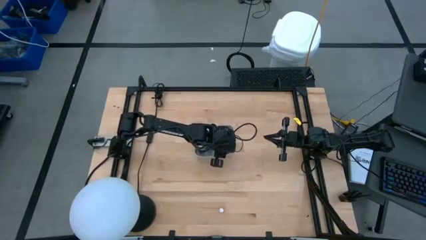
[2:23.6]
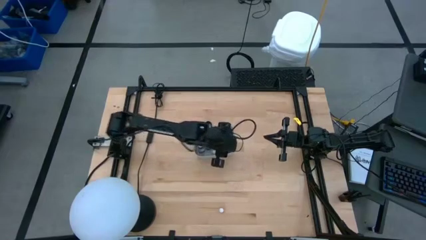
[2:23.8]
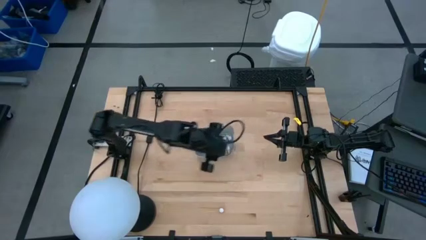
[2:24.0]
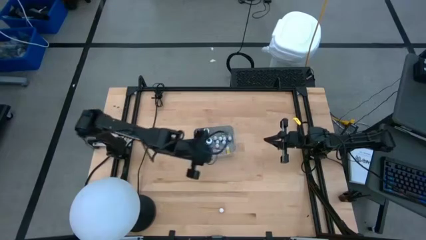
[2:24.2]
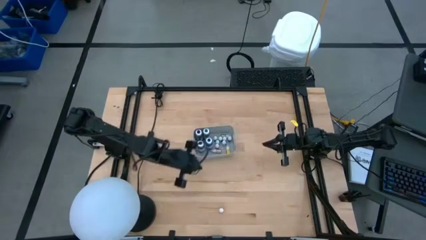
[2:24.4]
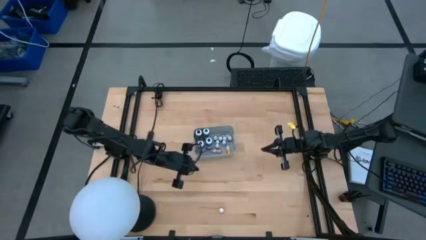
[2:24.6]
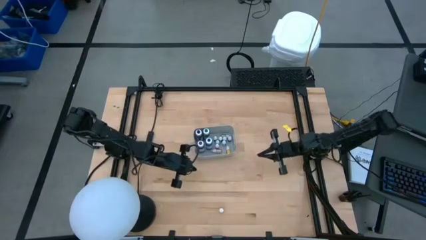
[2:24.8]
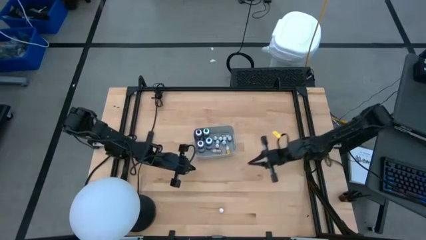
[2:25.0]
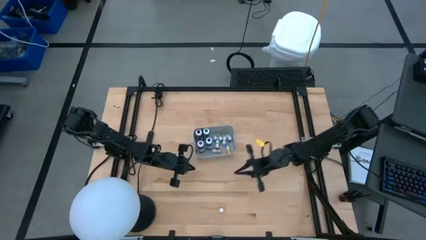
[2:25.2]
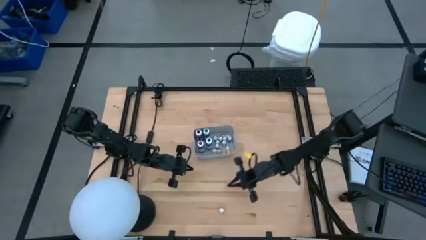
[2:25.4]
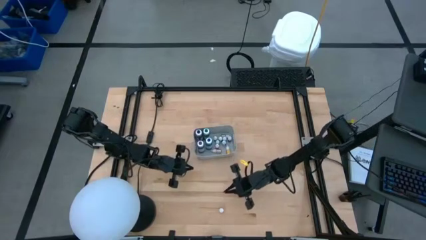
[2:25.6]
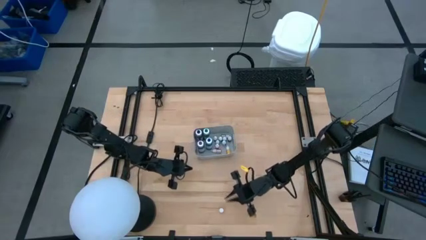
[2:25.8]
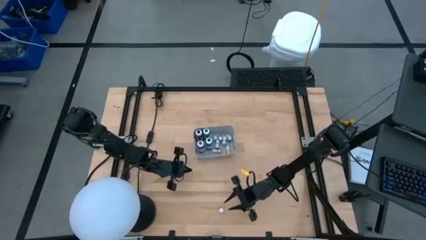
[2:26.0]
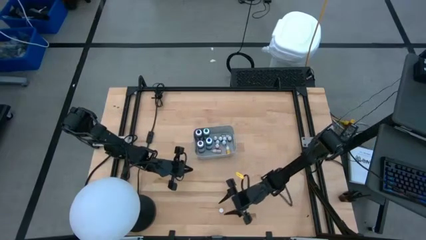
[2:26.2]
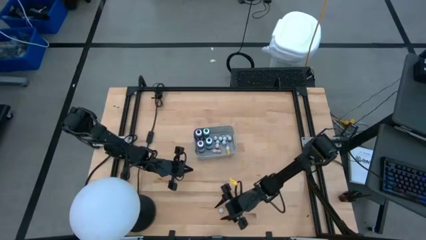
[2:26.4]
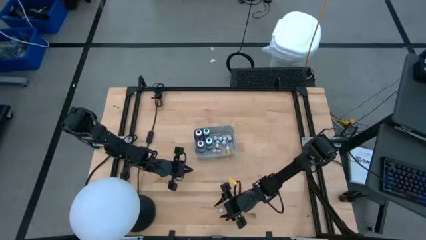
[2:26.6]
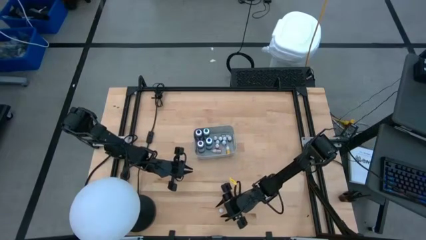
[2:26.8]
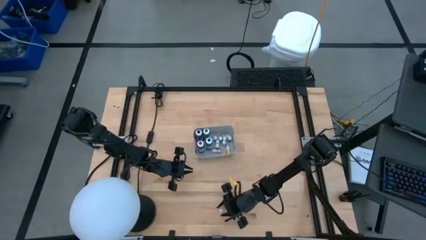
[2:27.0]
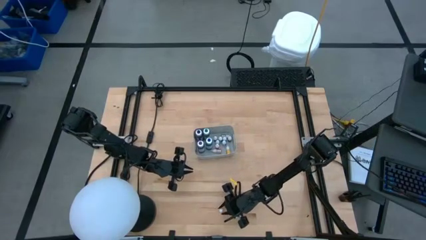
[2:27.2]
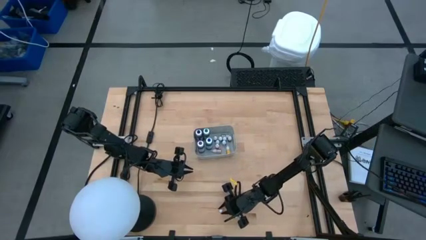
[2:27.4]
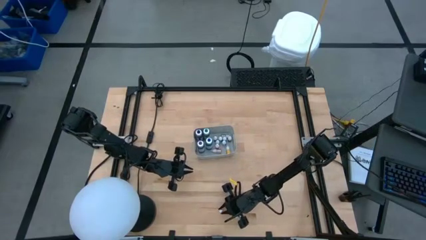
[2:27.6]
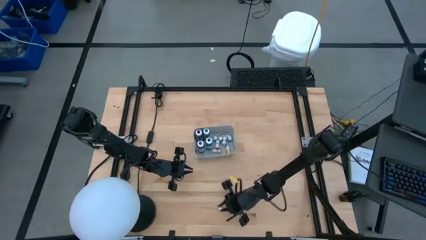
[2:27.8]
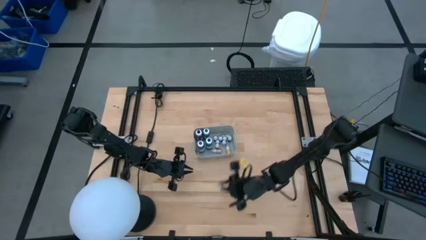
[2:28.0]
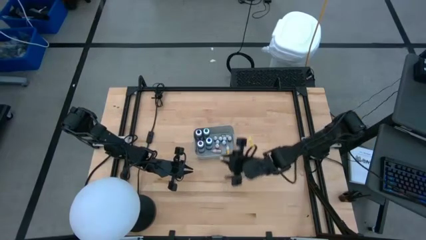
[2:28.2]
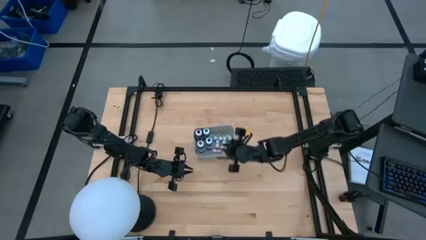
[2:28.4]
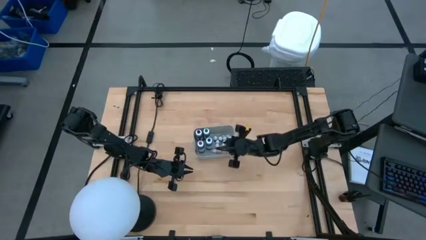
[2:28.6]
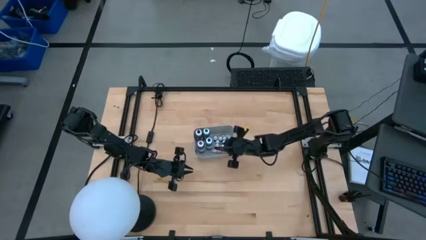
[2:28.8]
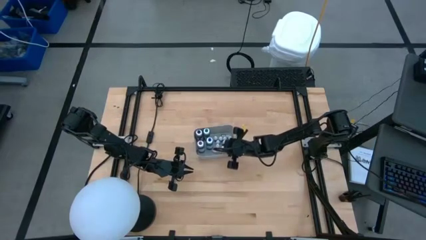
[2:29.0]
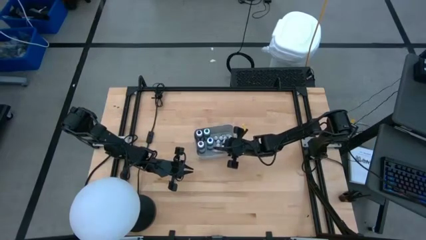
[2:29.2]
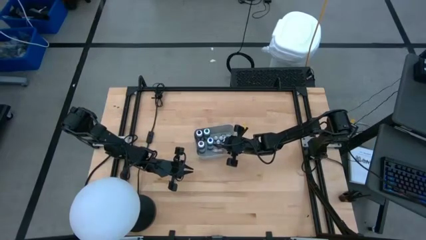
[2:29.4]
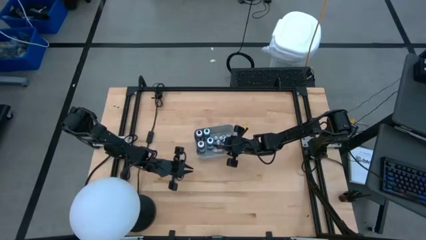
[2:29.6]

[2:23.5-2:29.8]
Task: Pick & Place food coloring
Put the small orange food coloring bottle into the gray bin

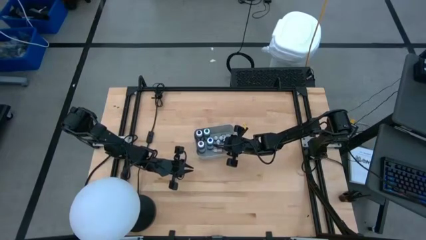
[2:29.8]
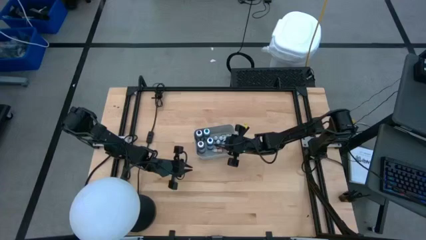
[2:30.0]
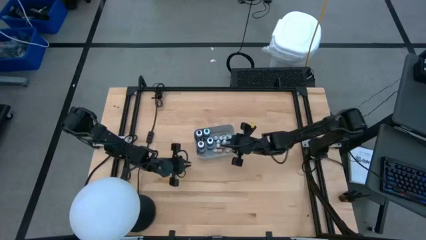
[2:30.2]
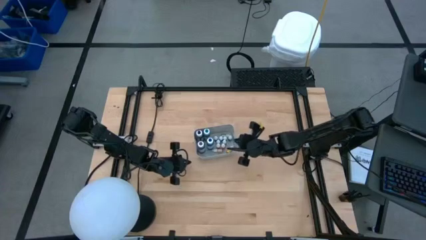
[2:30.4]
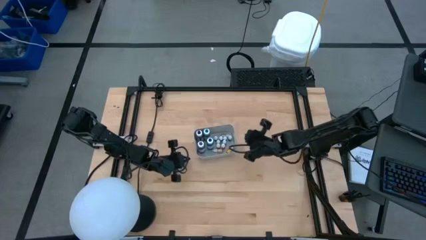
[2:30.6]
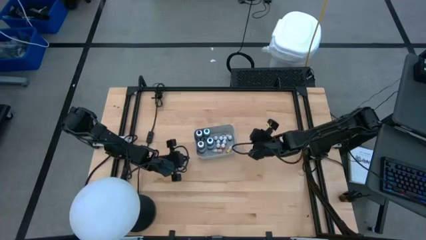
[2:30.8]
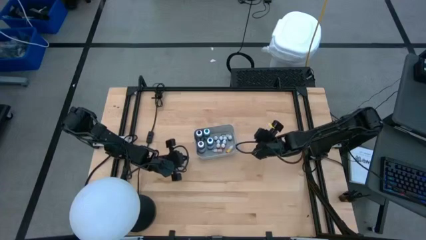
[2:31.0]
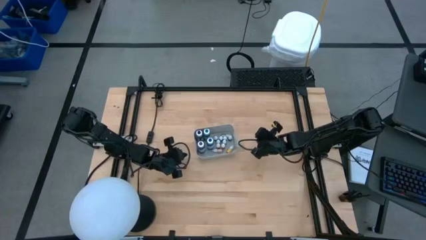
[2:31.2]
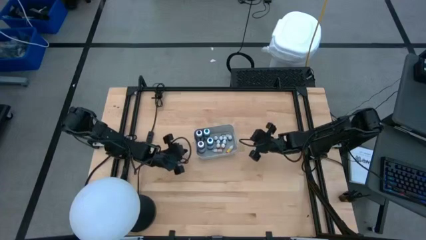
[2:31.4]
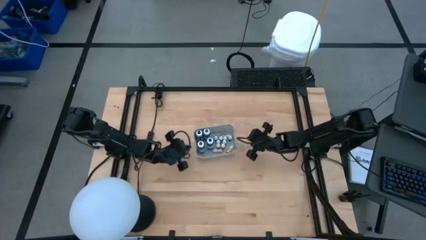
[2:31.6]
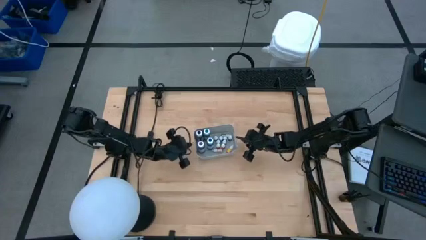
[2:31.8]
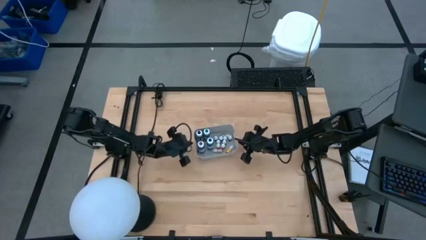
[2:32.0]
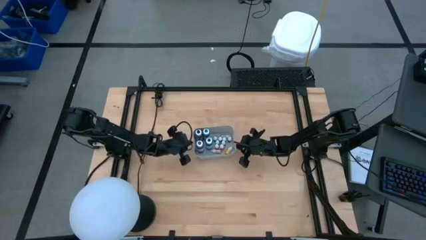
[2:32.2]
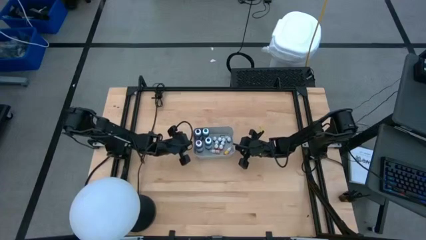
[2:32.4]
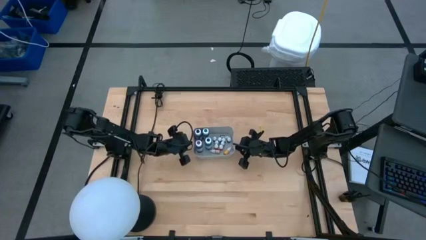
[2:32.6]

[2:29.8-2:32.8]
Adjust the gray bin

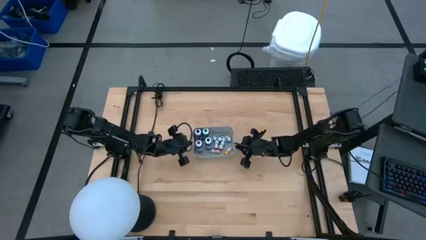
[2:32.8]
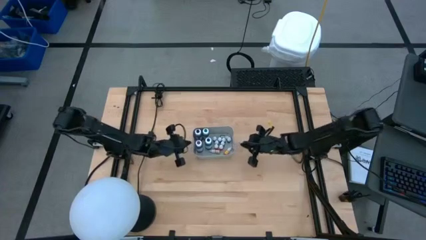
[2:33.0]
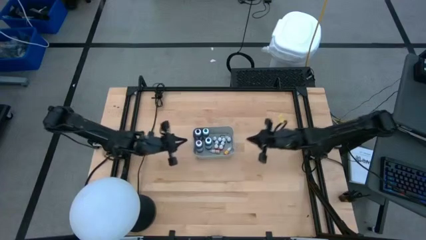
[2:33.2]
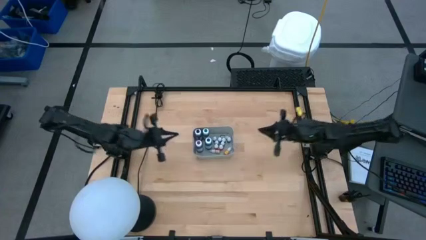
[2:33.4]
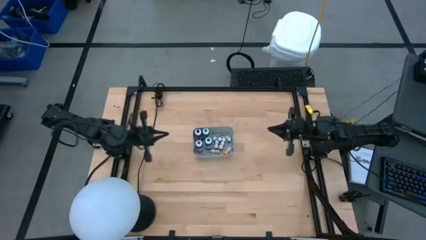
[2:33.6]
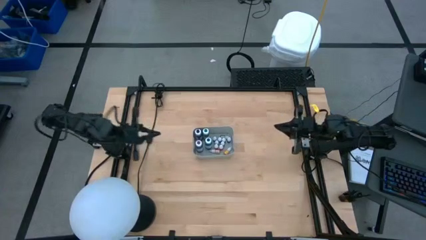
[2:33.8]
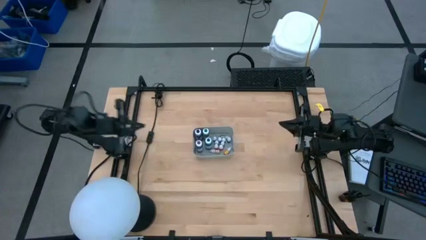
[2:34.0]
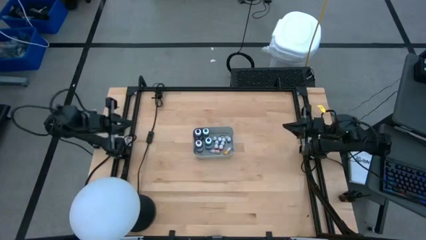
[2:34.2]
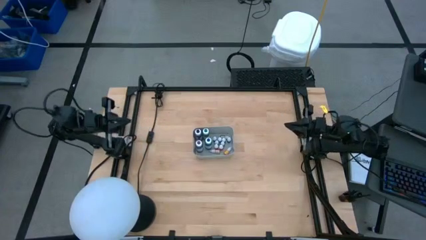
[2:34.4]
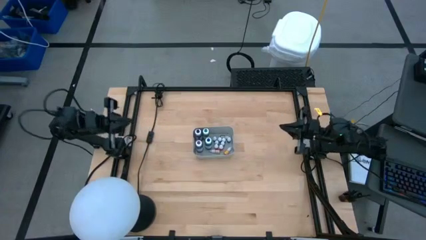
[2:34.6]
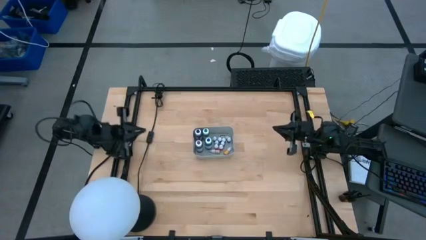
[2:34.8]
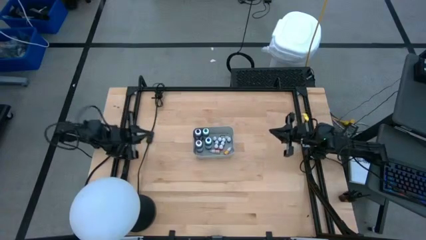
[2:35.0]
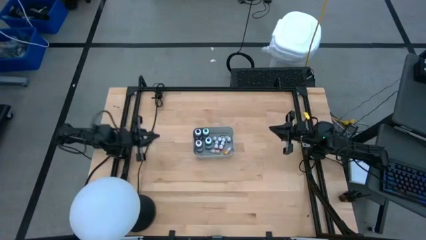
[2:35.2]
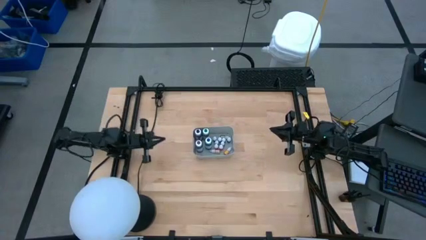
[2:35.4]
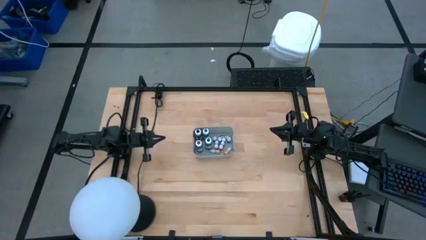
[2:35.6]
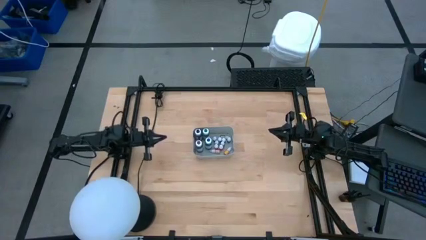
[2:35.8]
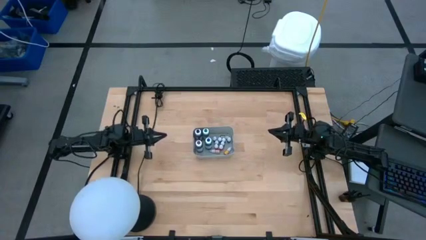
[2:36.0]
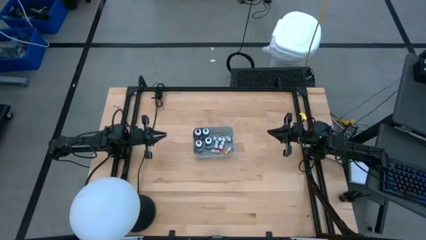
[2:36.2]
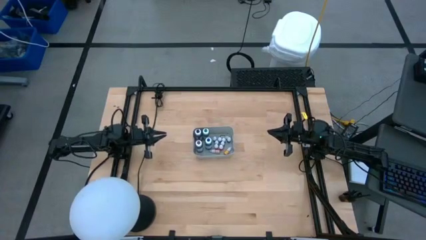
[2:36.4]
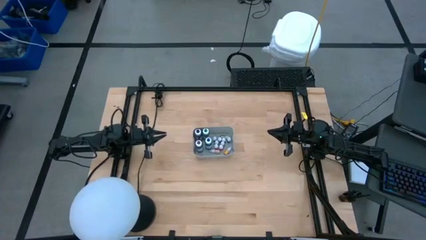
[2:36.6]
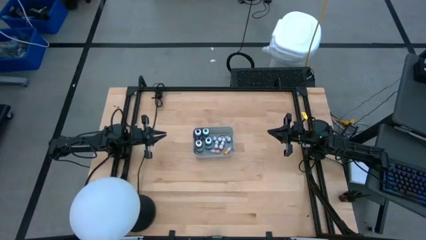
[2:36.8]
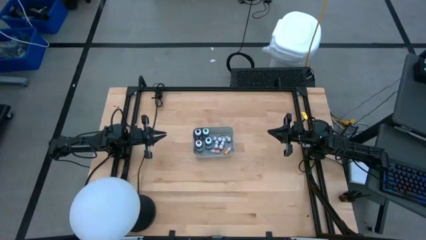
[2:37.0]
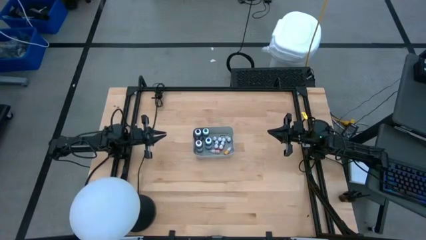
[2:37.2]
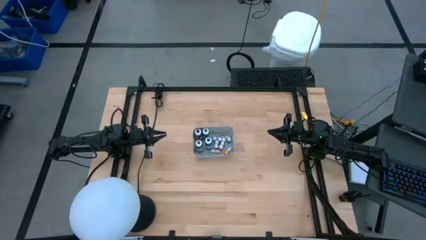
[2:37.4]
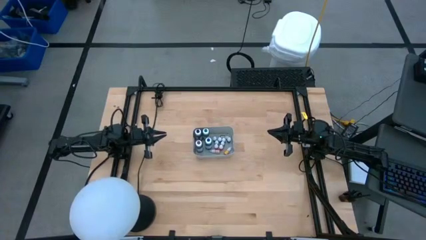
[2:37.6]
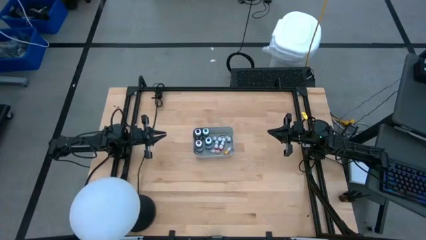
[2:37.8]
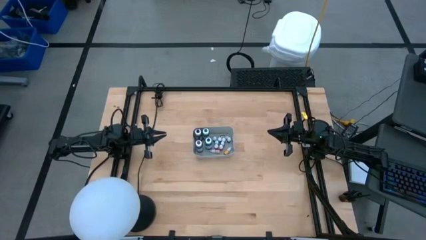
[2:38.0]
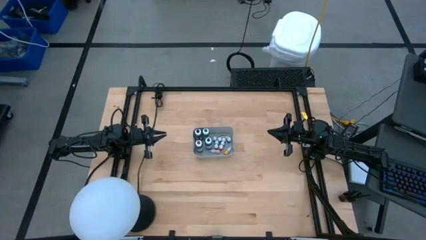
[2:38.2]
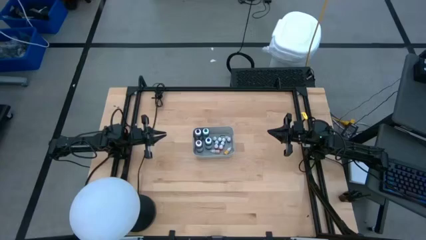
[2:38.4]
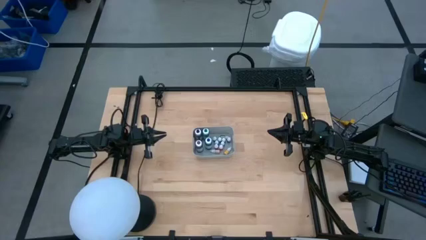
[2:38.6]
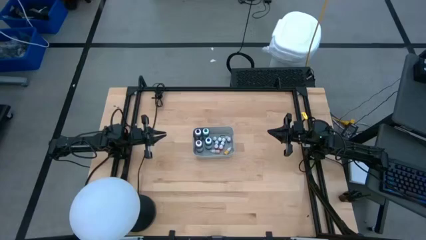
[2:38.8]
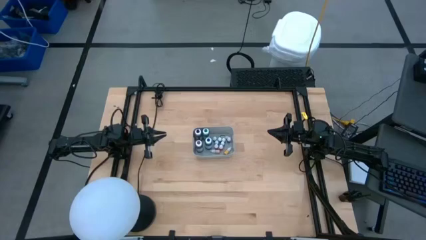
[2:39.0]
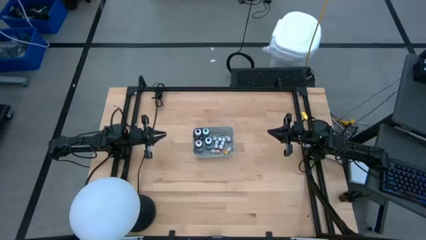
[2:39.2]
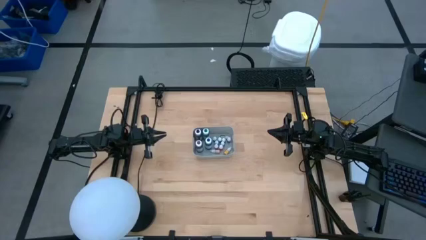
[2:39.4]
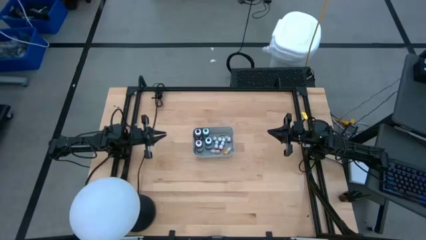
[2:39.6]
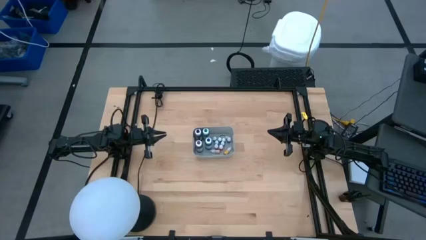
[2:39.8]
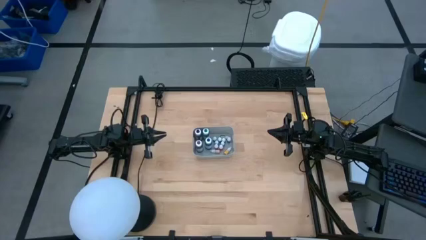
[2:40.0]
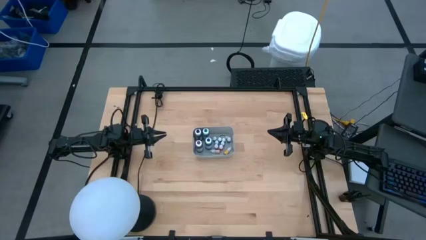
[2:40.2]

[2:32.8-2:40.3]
Return to Home Position
